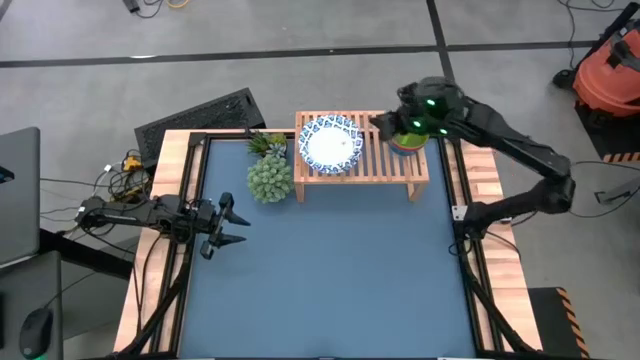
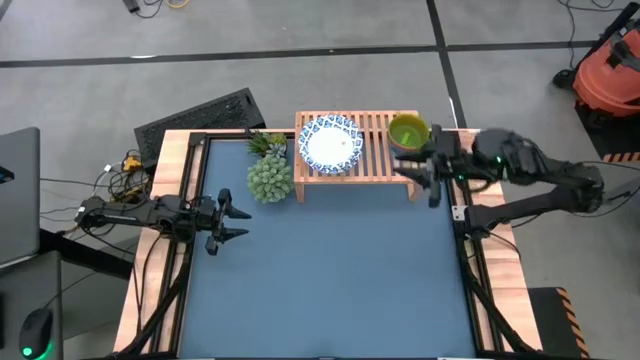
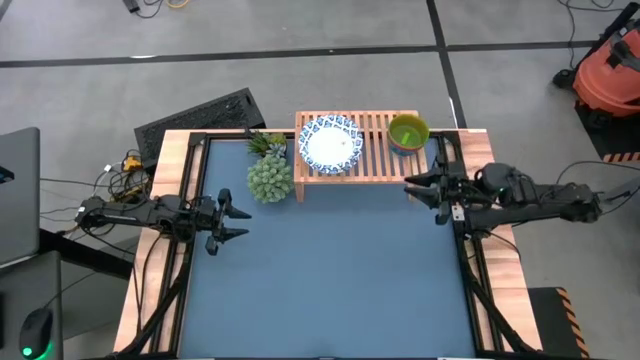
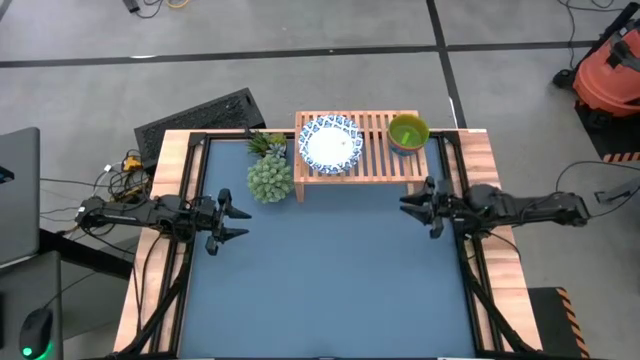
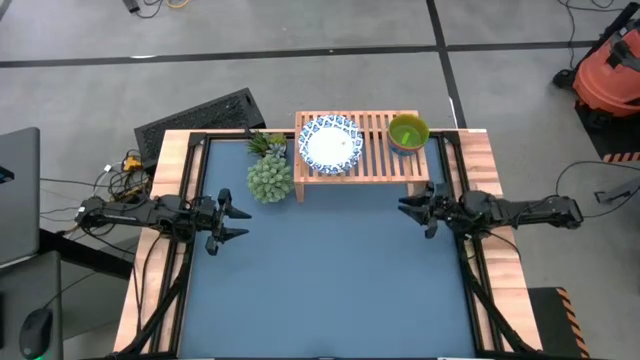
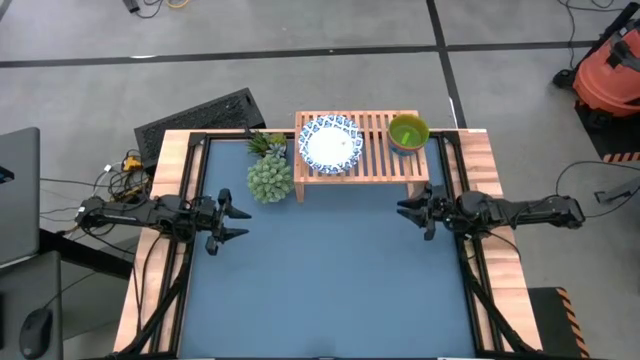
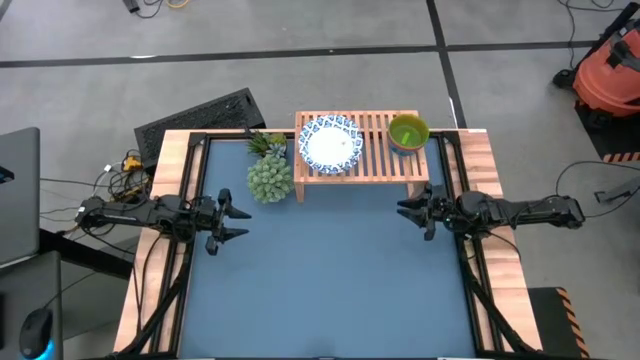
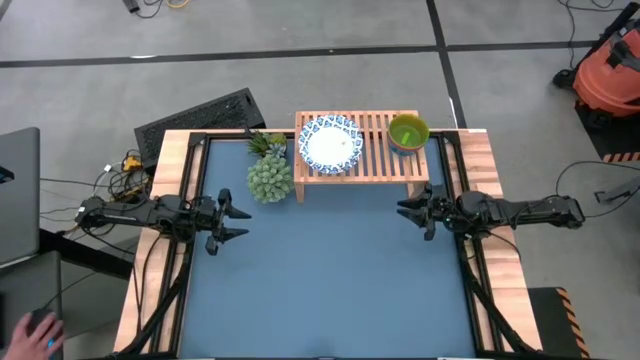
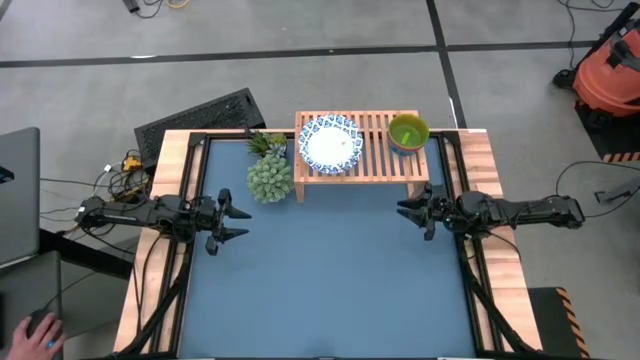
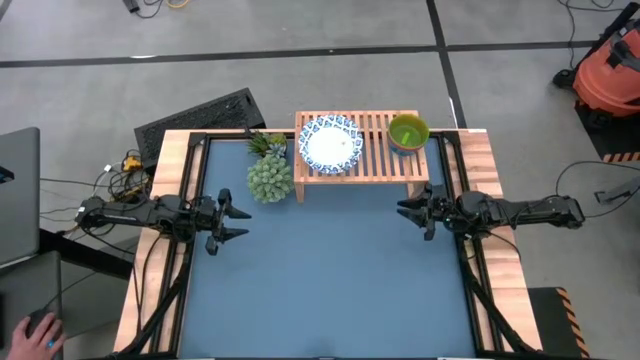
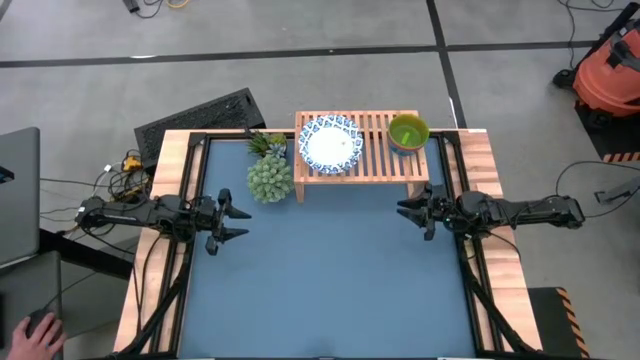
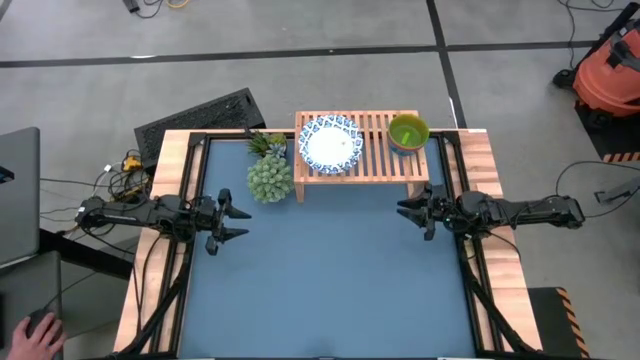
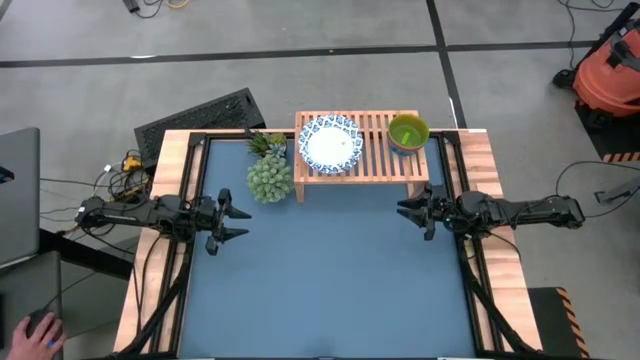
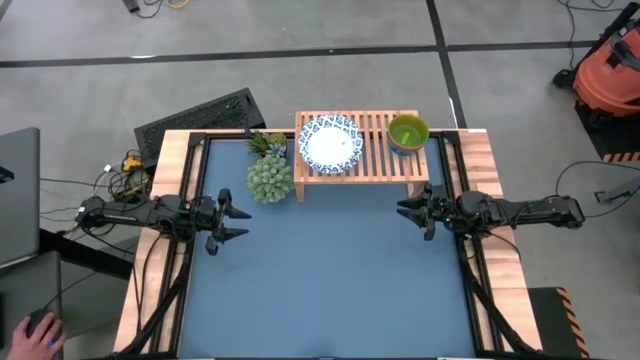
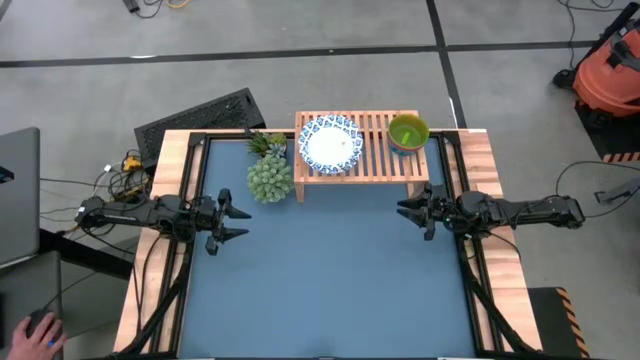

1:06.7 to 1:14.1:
Task: Place and stack bowls onto a shelf
Return to Home Position

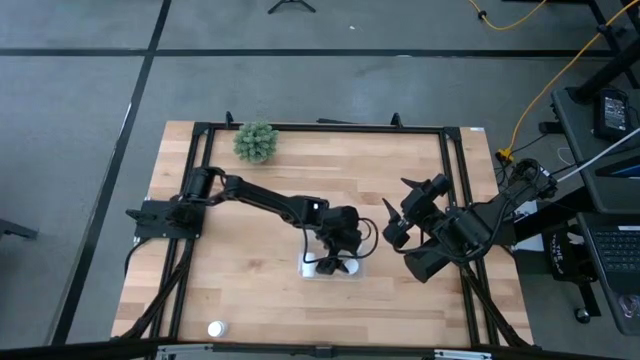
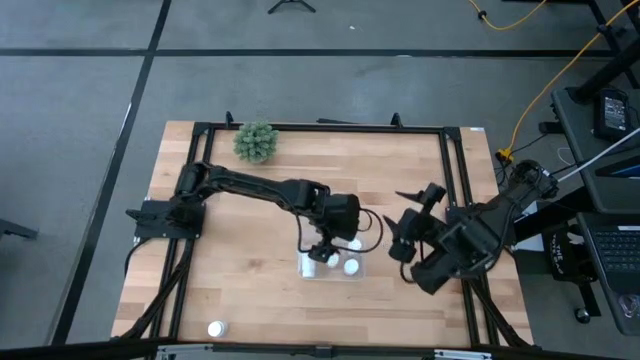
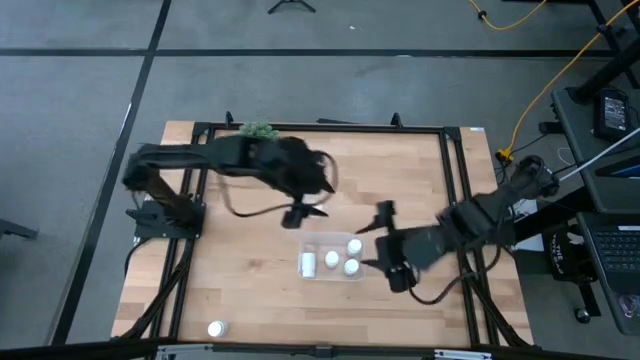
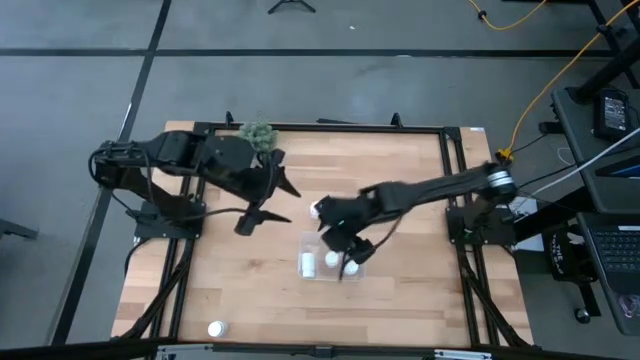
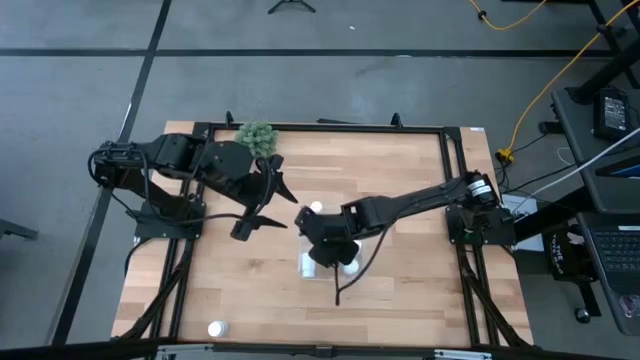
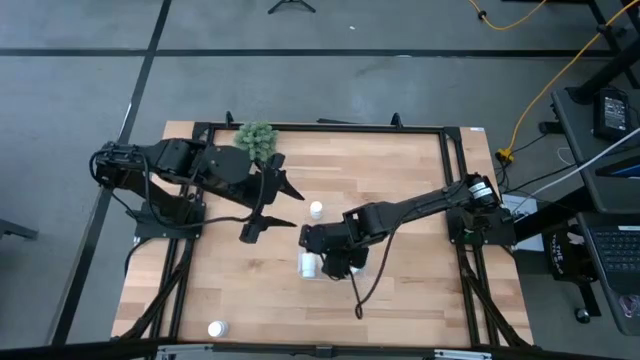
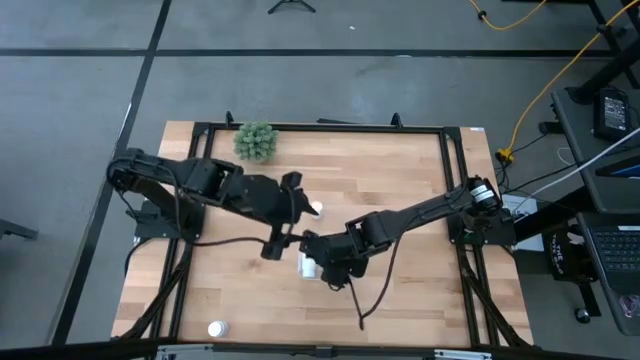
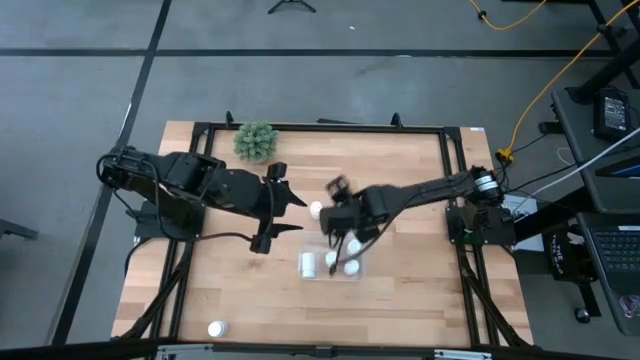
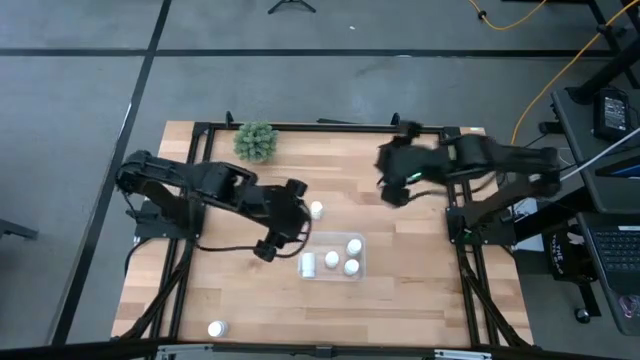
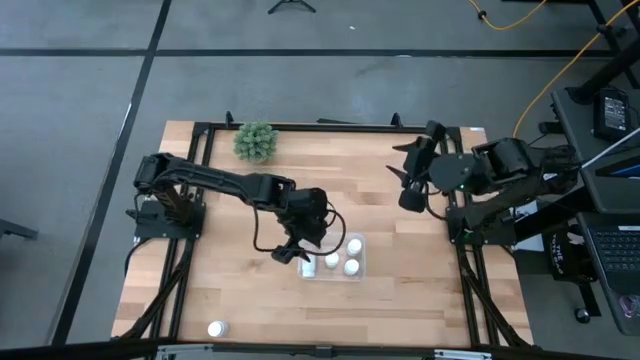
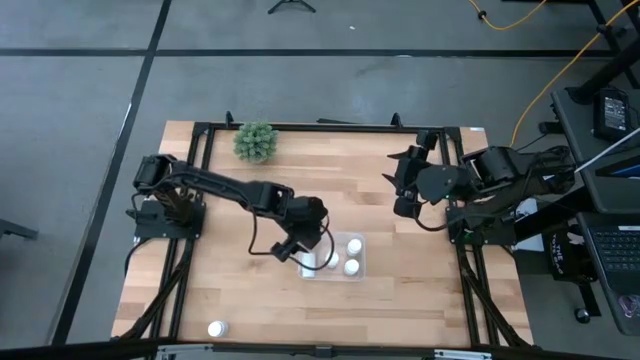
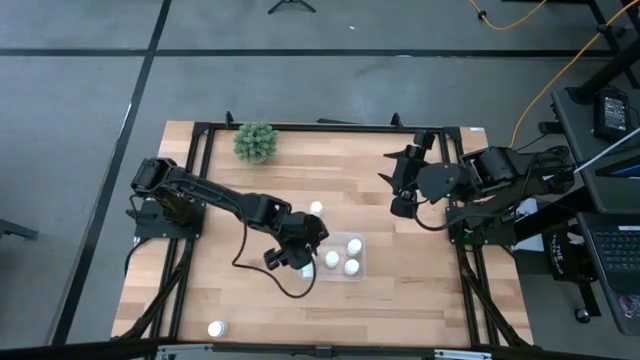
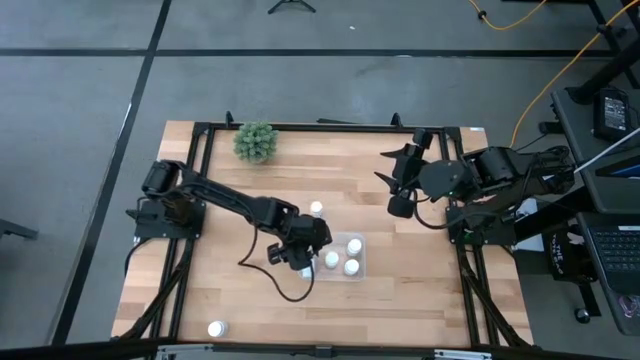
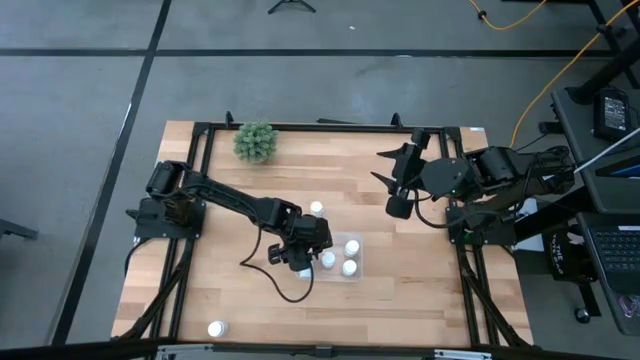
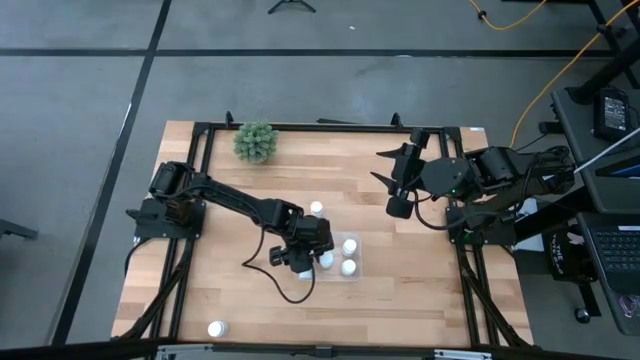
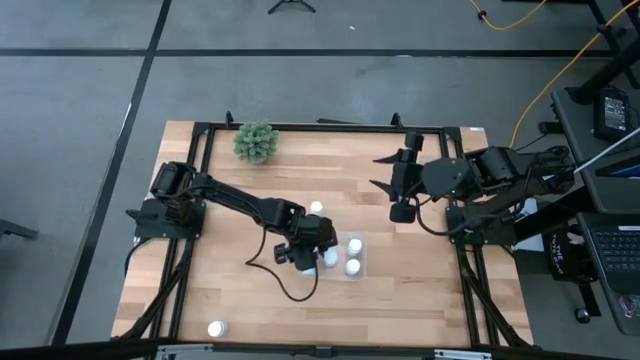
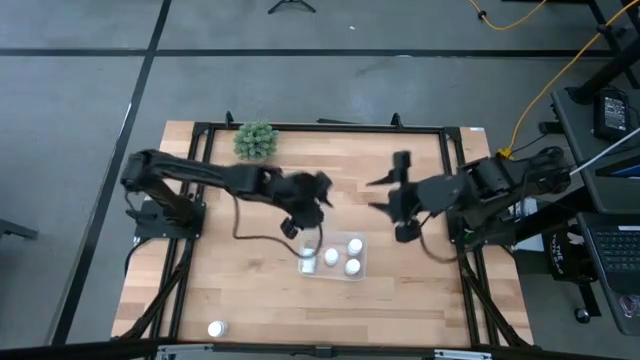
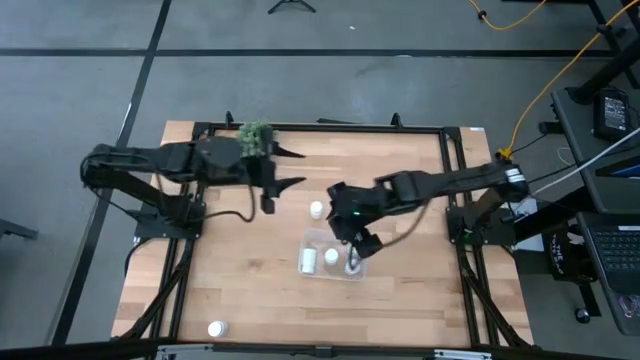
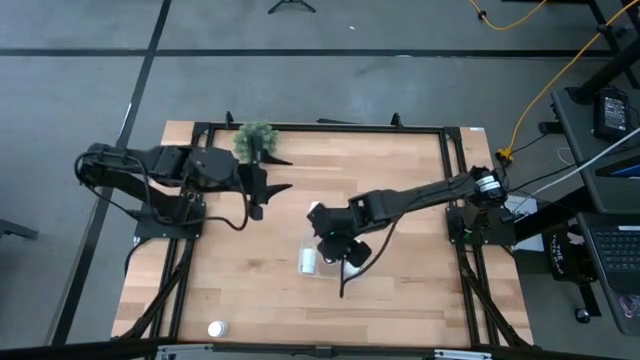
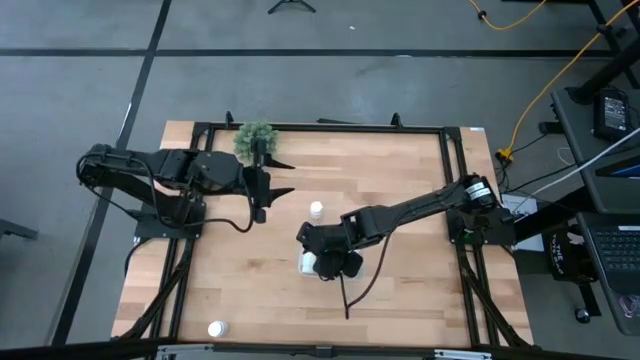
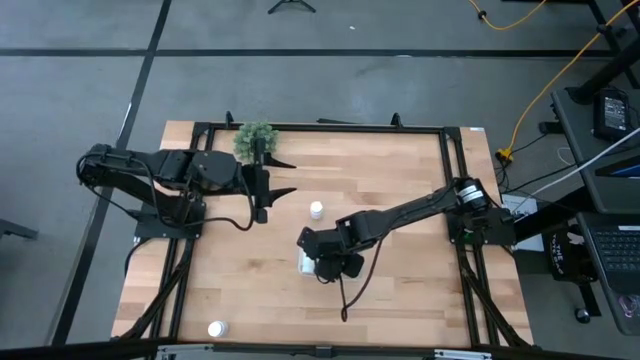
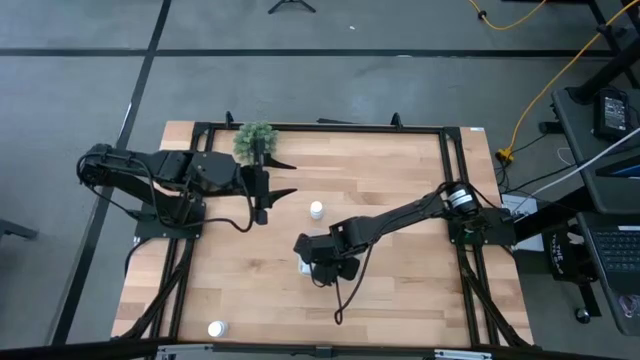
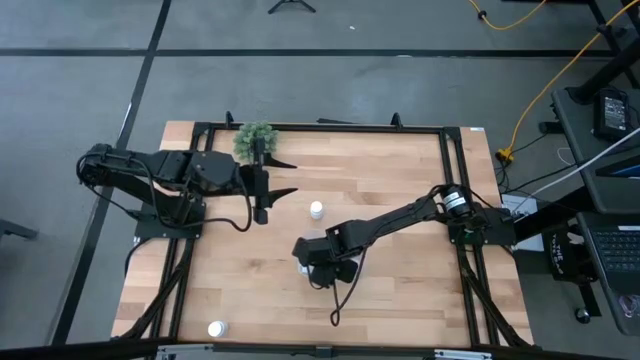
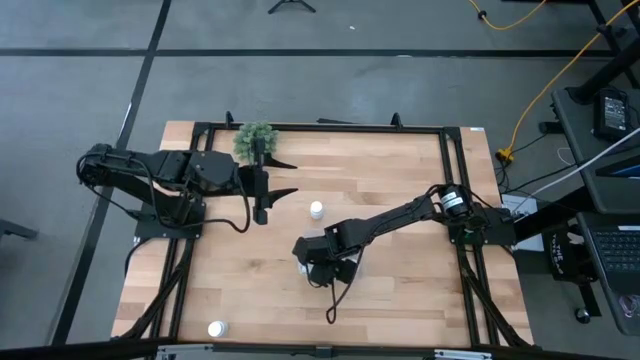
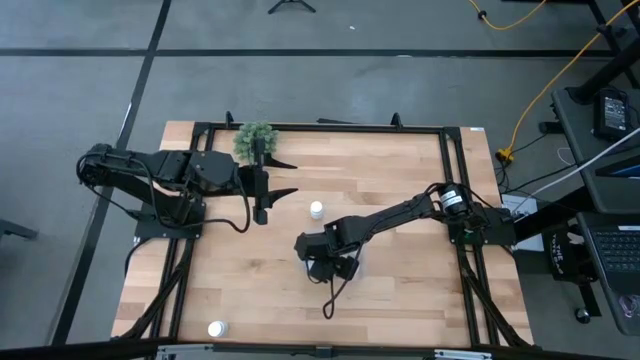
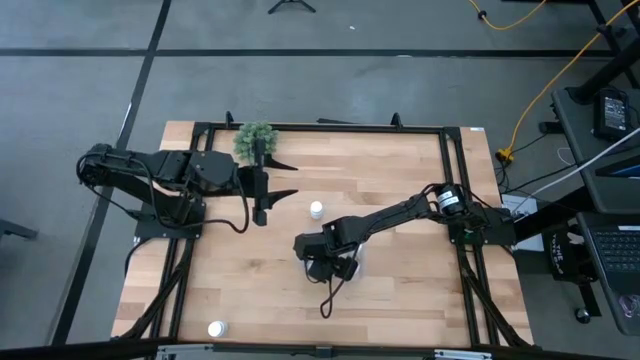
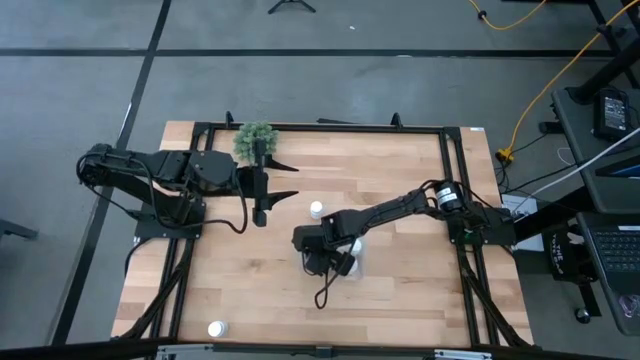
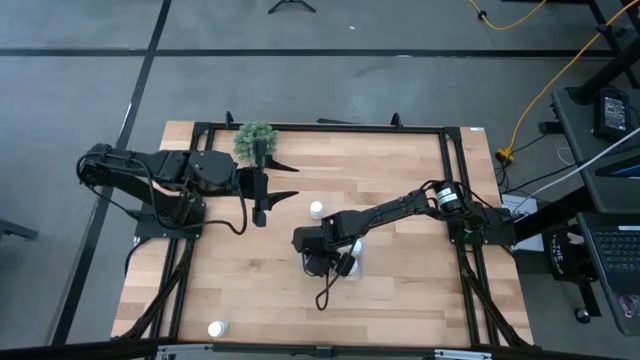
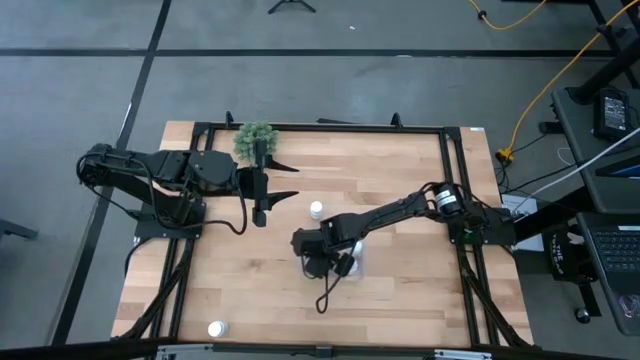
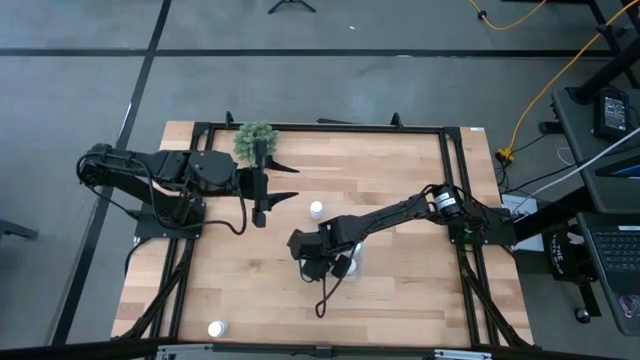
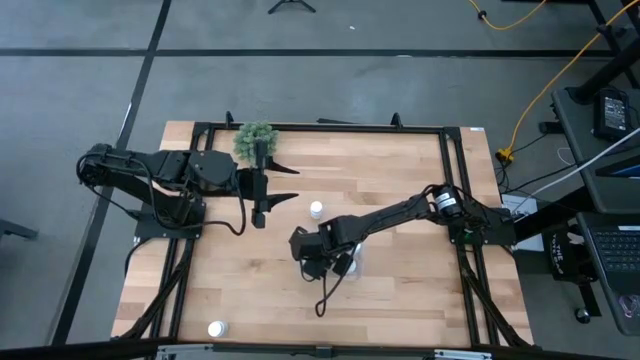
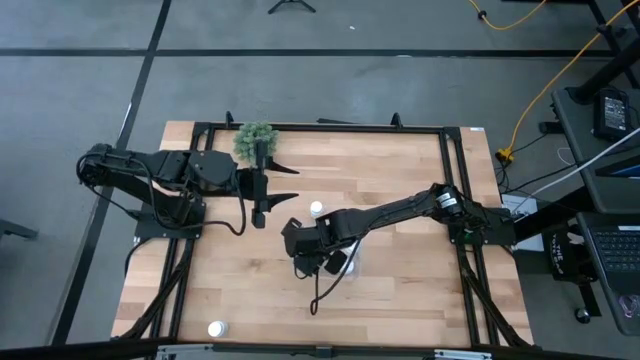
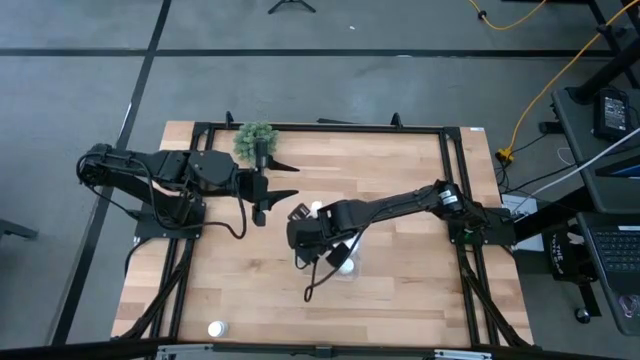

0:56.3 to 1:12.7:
Task: Pick and place pill bottles into a basket
Adjust the white medicine bottle on the transparent bin
